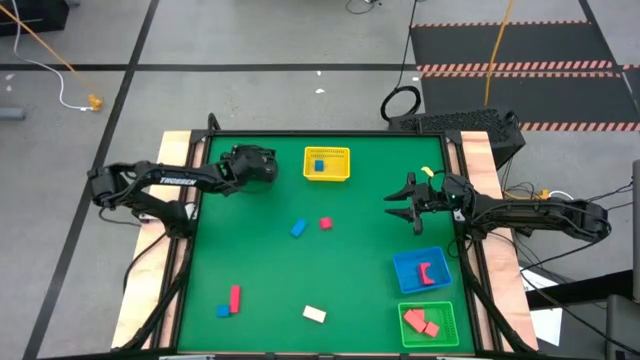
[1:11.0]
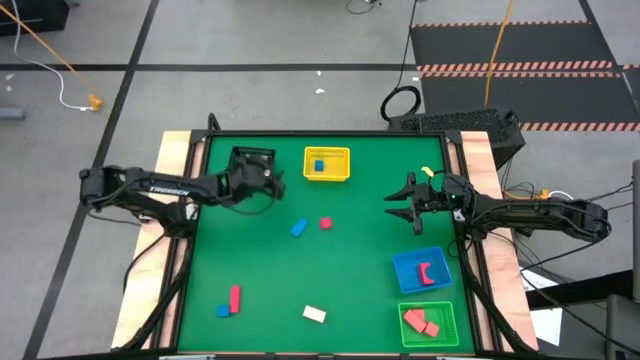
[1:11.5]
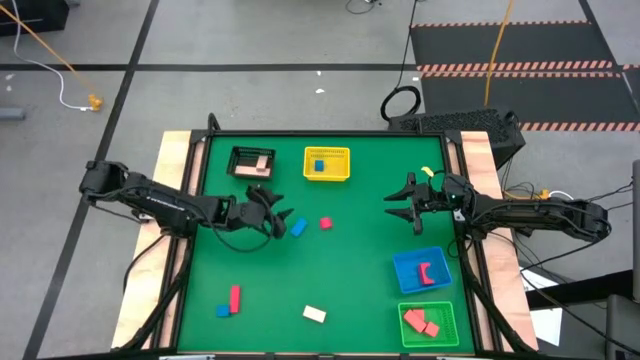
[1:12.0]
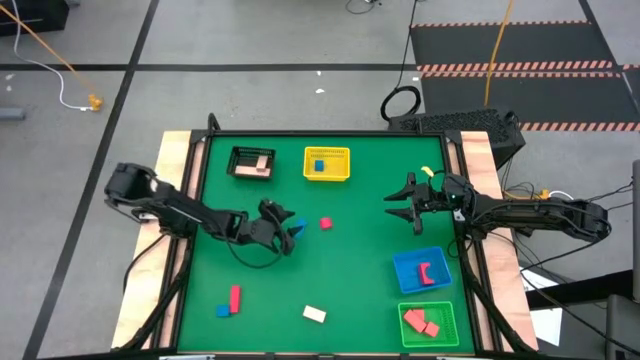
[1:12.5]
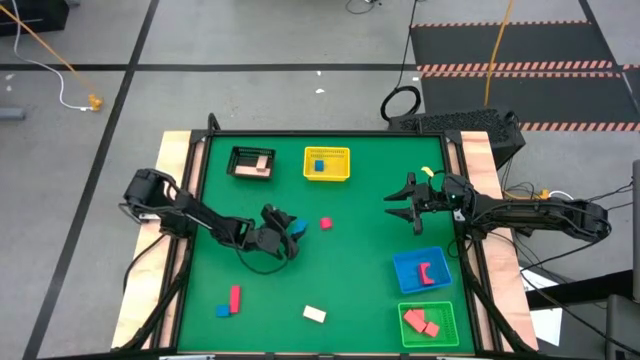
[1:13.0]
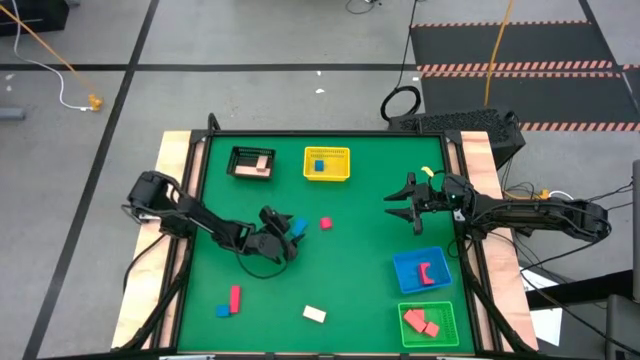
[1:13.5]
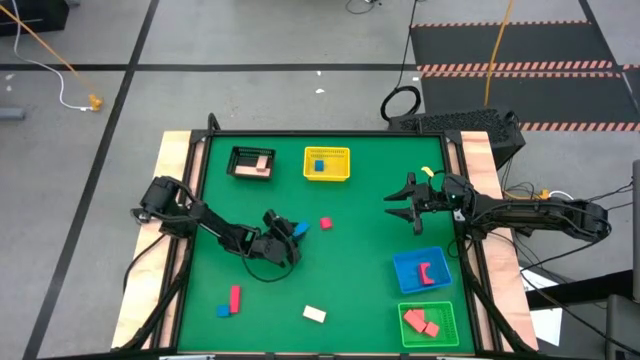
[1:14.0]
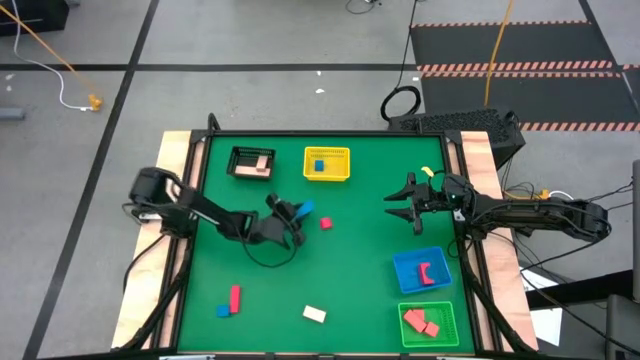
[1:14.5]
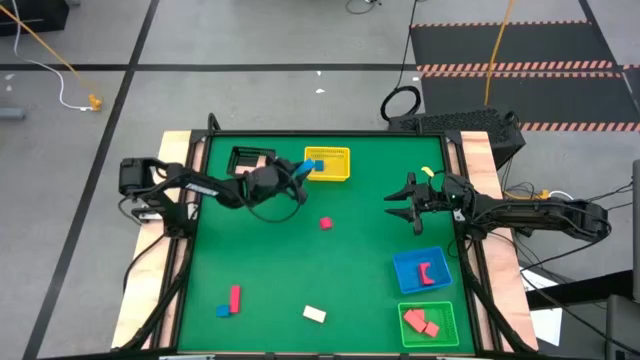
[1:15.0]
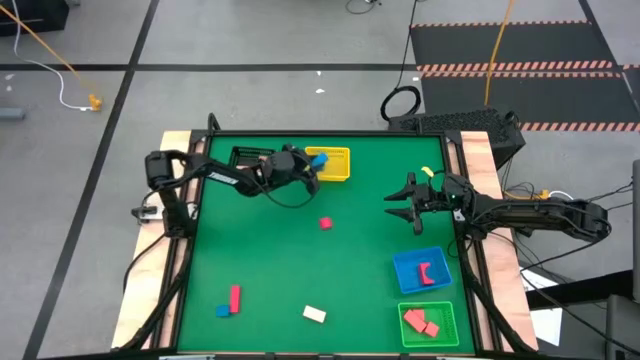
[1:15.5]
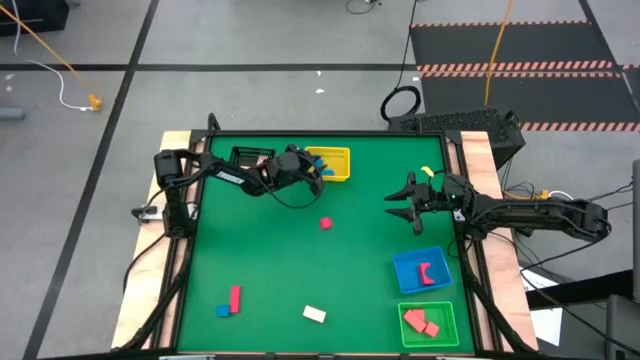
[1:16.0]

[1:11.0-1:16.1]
Task: Sort & place blocks by color
Put the top blue block into the yellow bin

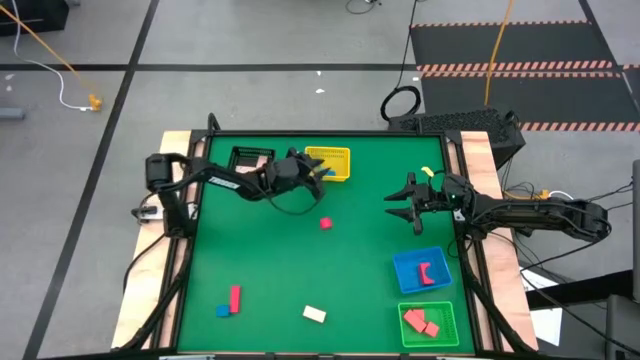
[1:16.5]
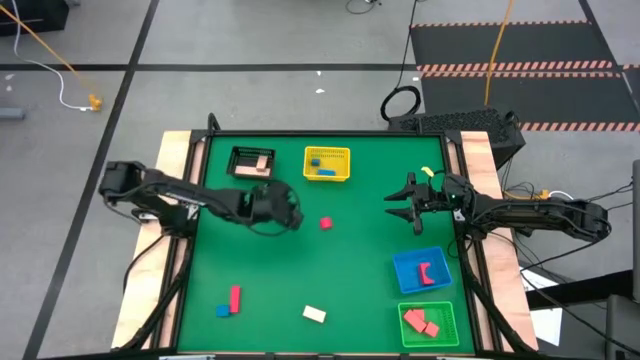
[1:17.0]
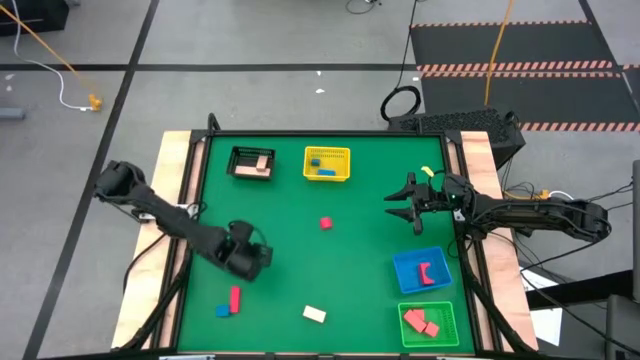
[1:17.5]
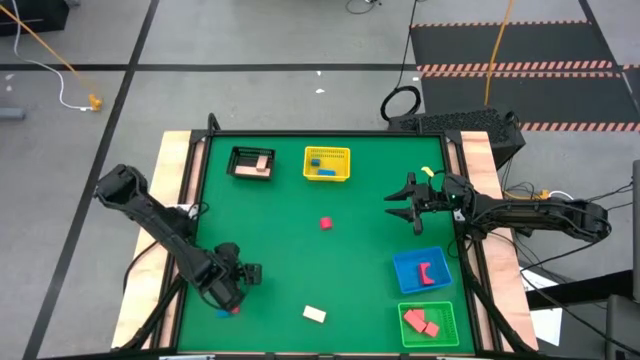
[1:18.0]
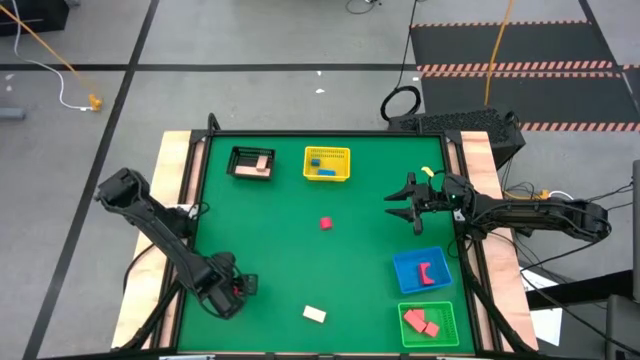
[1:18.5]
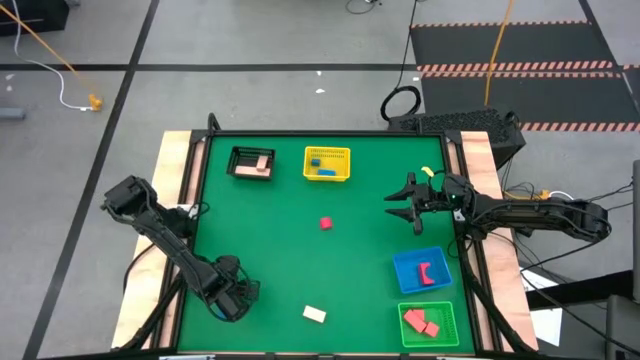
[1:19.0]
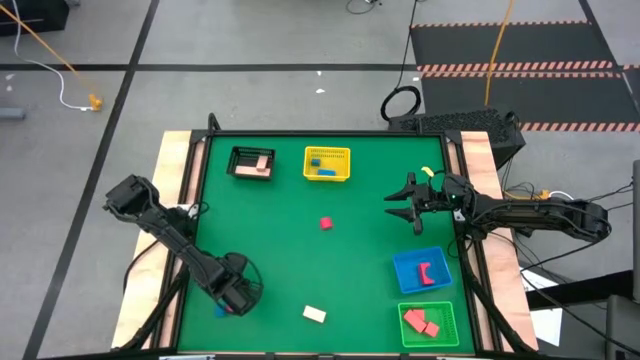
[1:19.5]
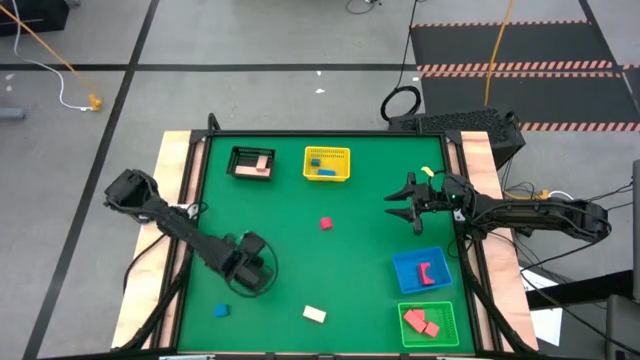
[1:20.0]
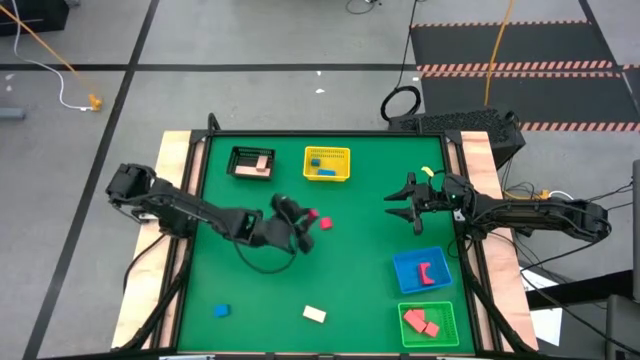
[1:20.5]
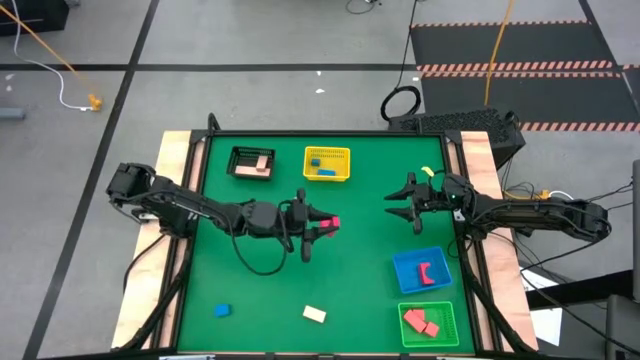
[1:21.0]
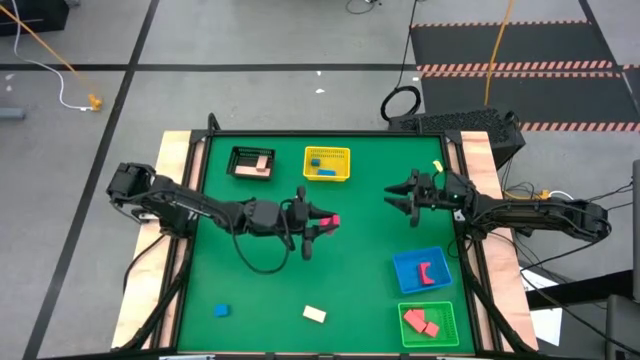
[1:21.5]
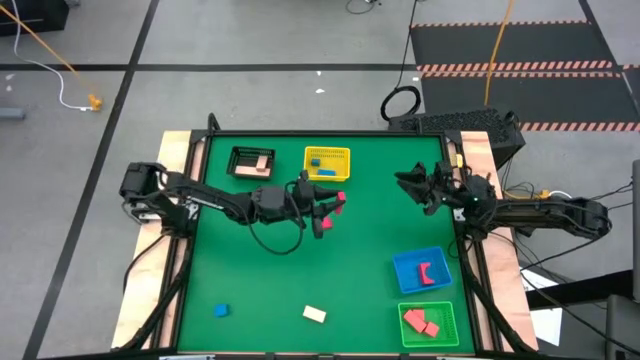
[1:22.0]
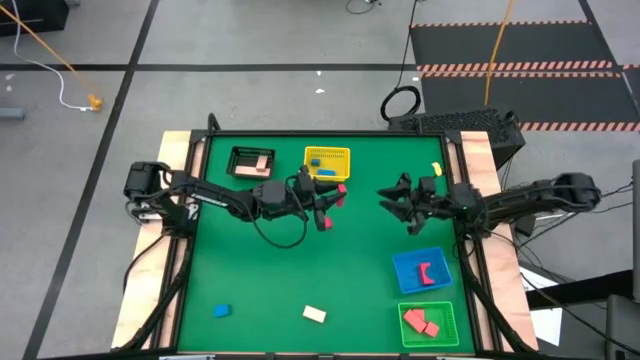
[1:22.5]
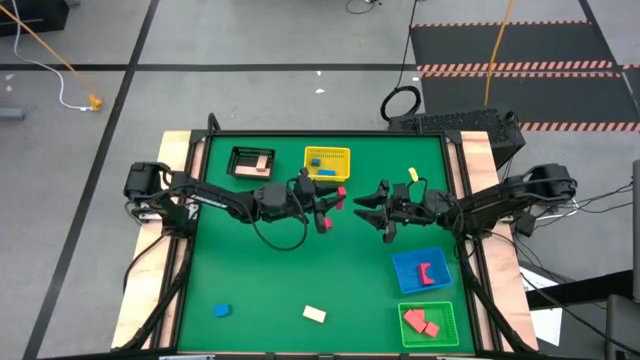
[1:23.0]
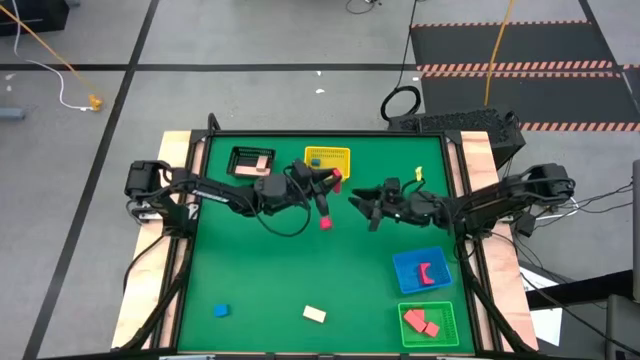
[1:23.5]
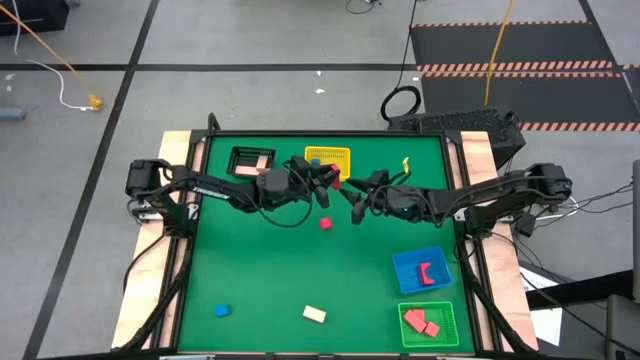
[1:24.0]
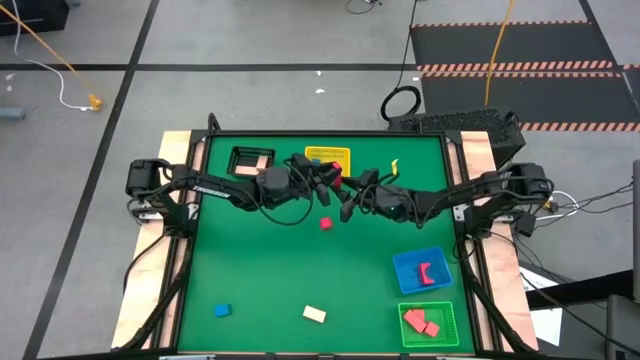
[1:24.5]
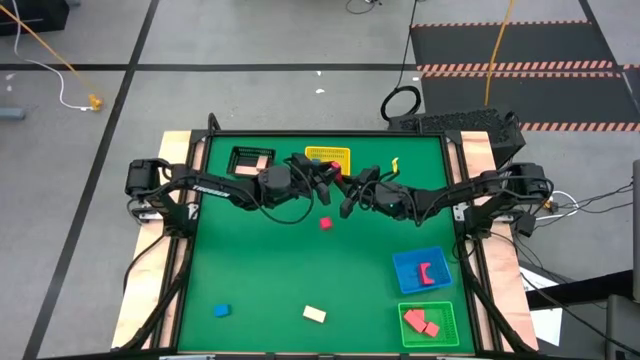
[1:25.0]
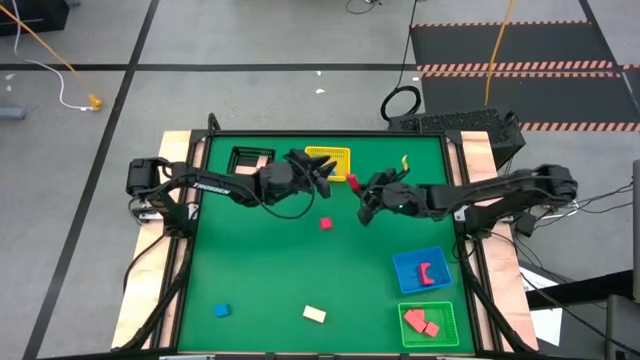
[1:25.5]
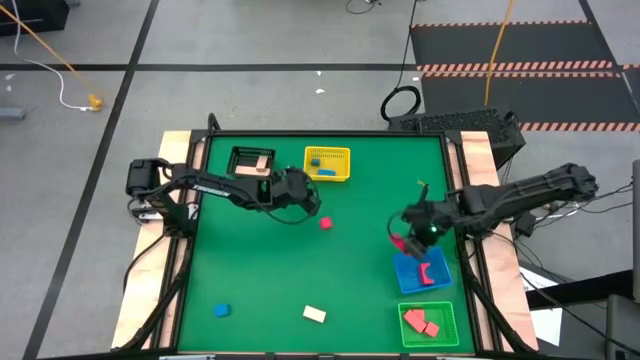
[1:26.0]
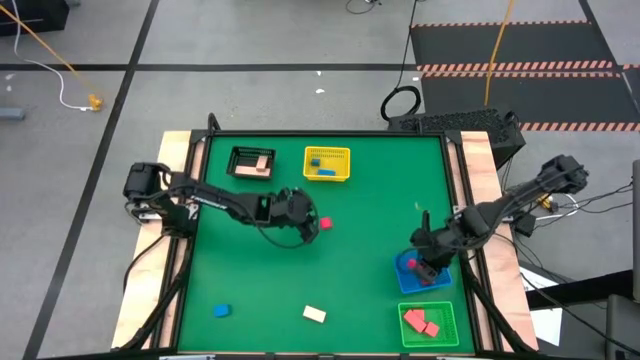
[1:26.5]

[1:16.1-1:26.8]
Put the bottom red block into the blue bin

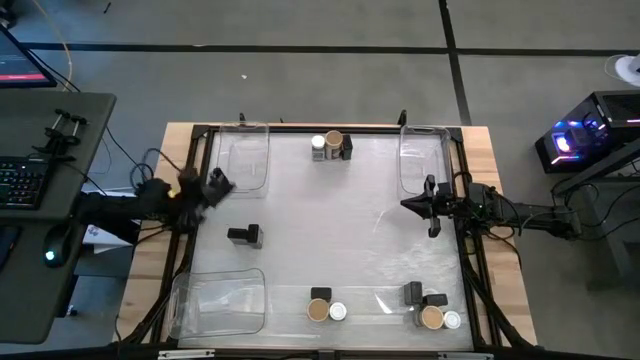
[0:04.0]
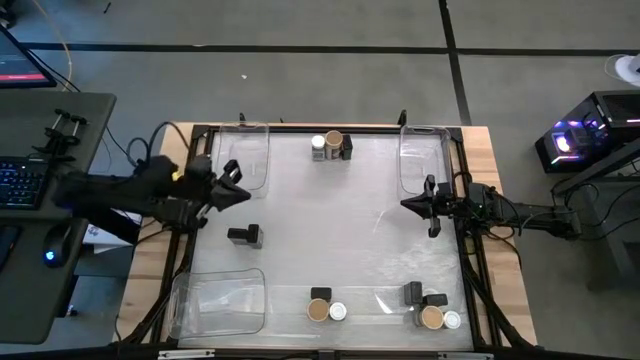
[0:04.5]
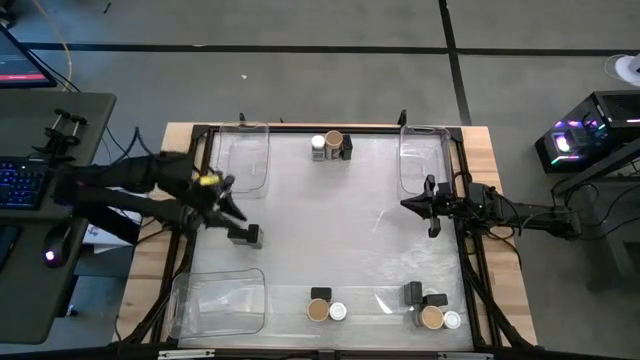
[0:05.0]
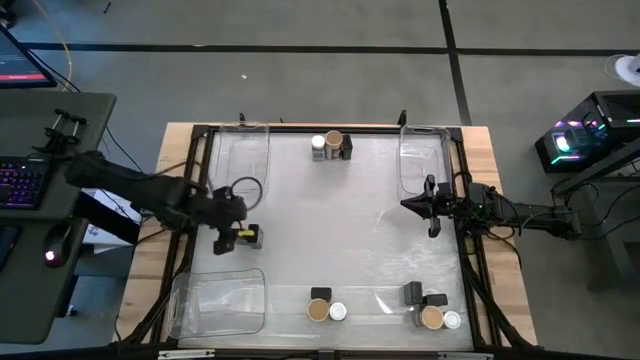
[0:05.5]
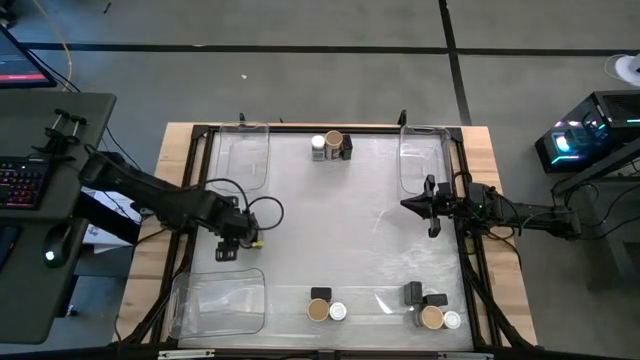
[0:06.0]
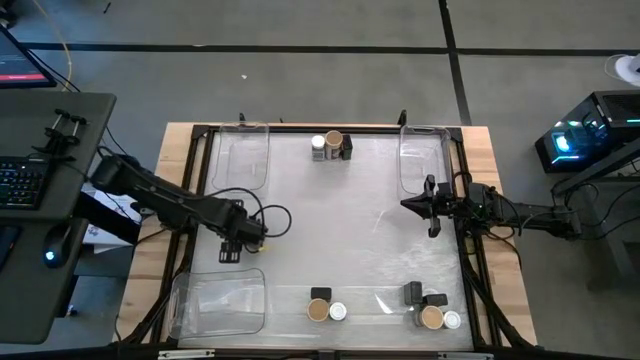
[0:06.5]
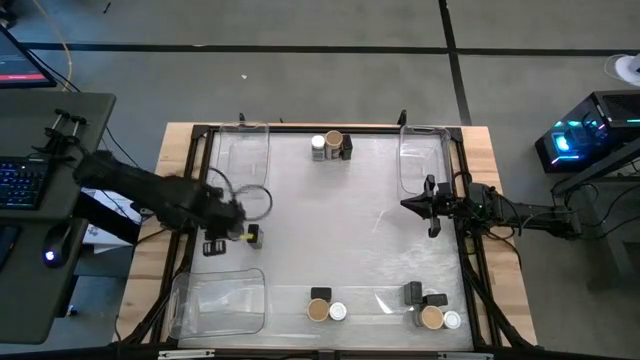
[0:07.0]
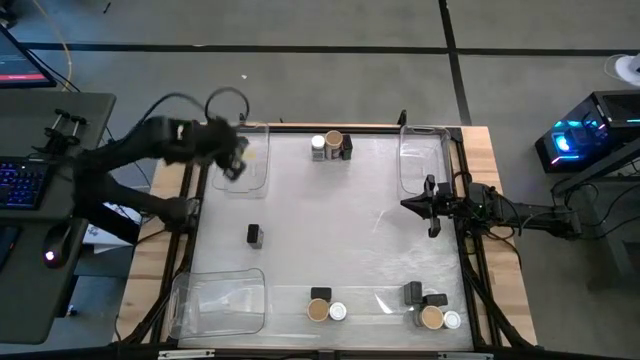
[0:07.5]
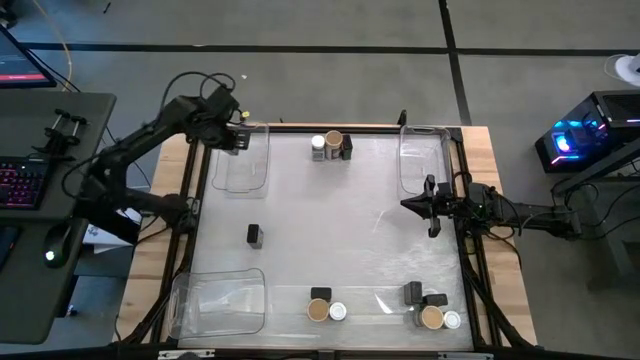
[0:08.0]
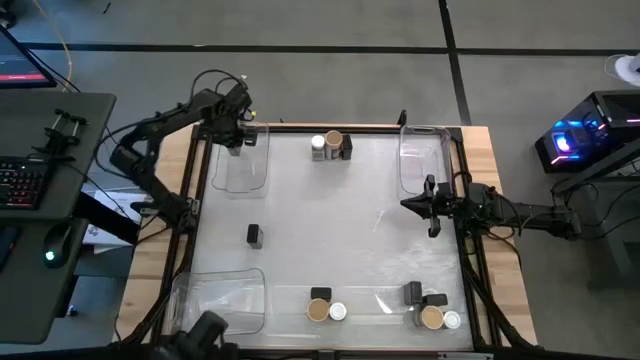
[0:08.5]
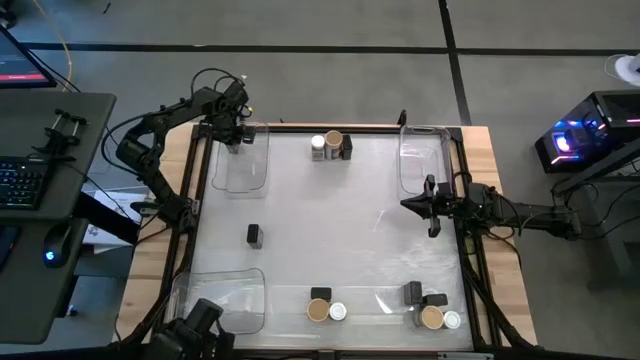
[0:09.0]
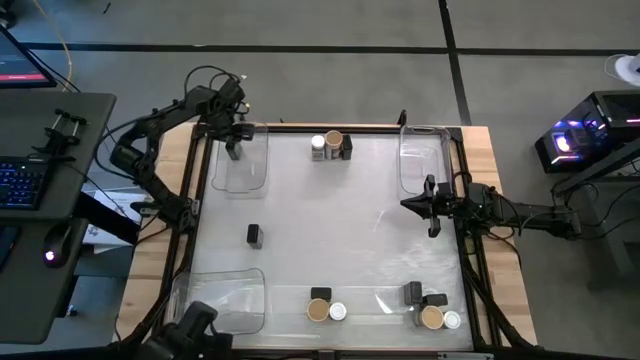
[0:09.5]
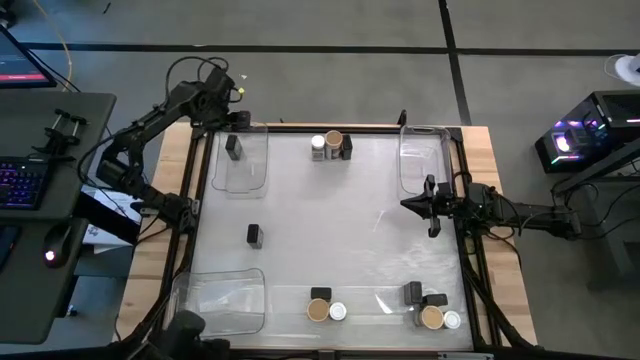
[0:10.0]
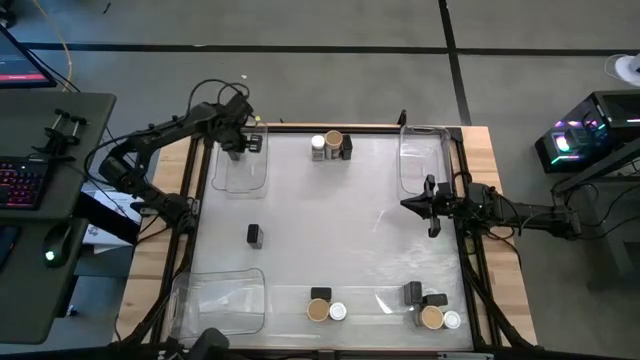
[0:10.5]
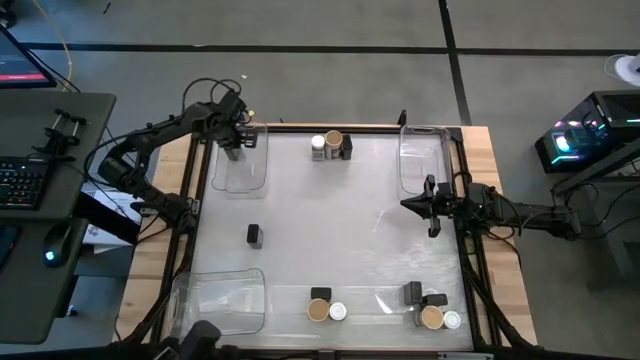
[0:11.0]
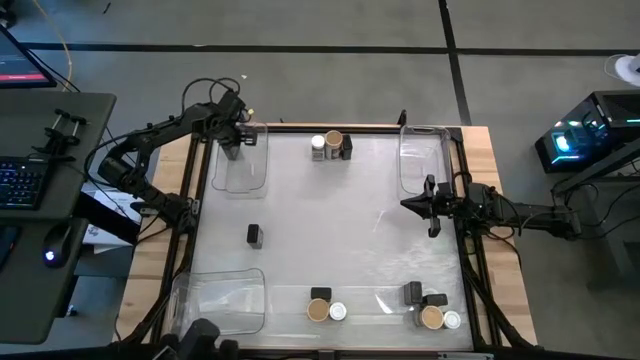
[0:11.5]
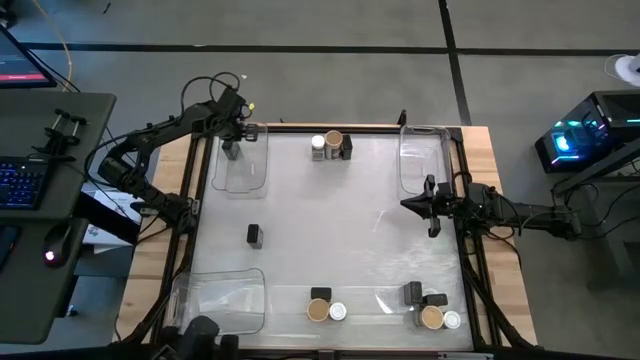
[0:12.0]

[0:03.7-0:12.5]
Task: Sort spices by type
Put the black seasoning can into the top left transparent bin
